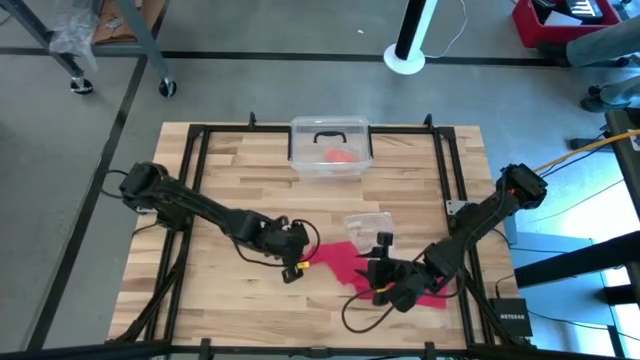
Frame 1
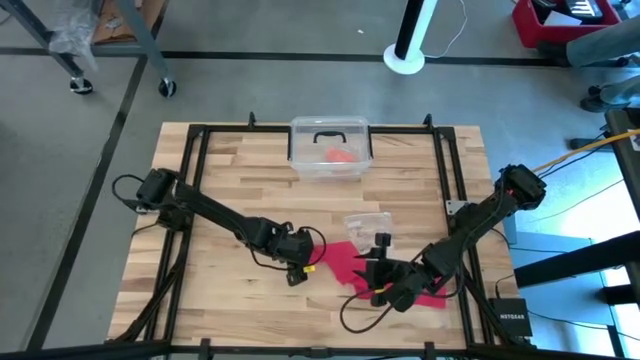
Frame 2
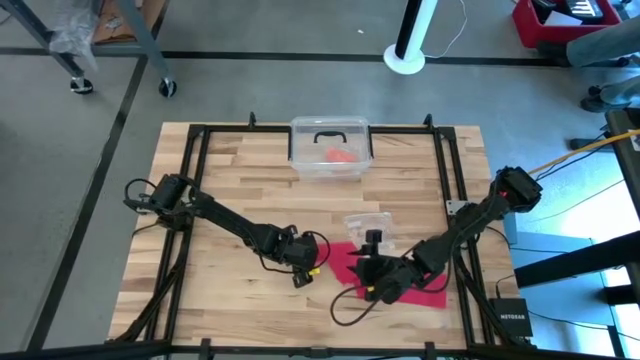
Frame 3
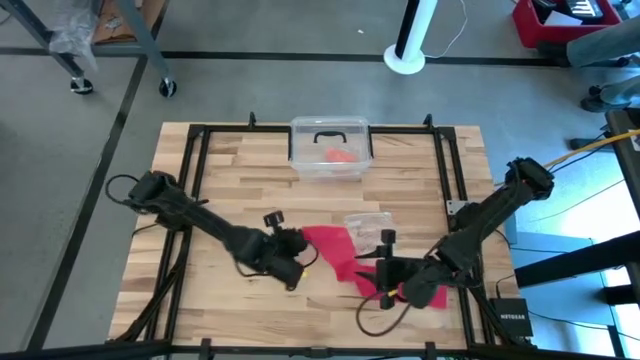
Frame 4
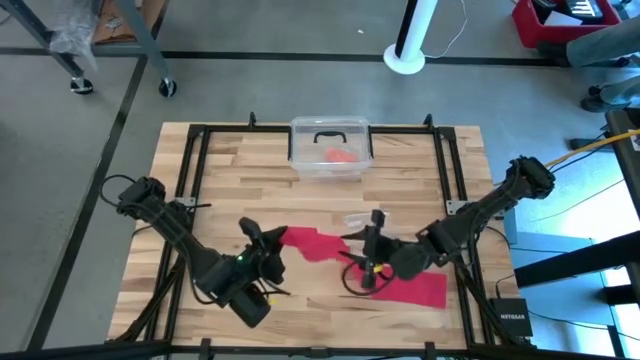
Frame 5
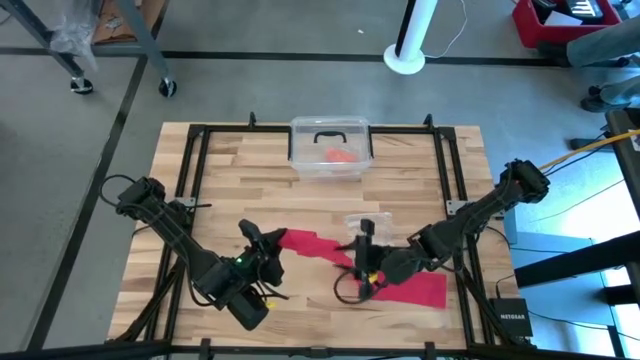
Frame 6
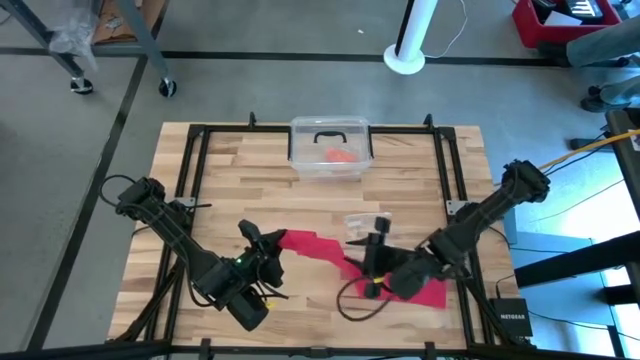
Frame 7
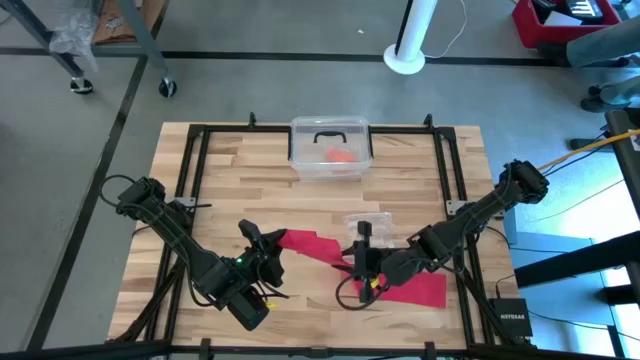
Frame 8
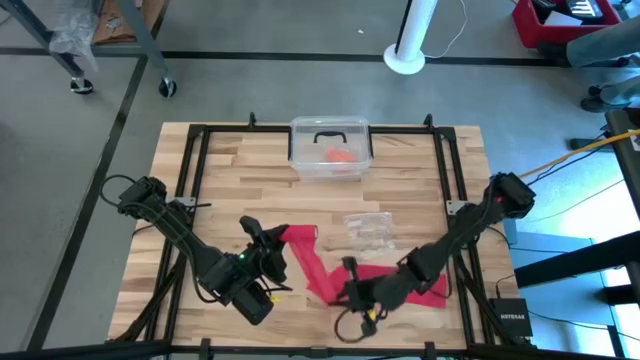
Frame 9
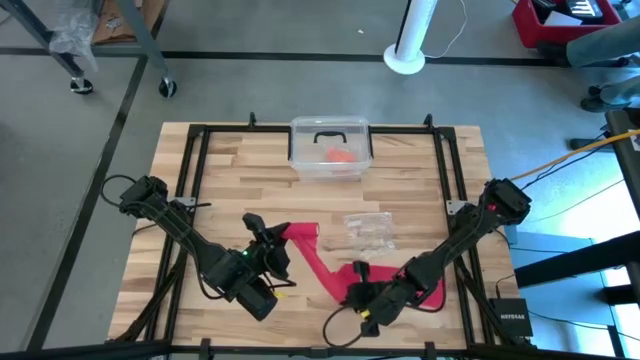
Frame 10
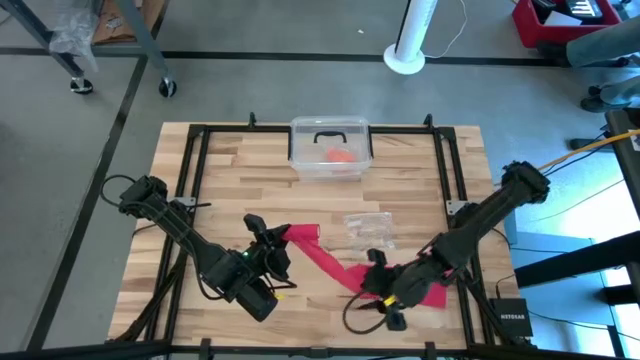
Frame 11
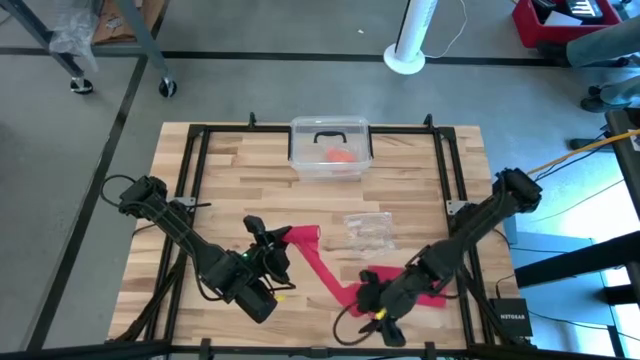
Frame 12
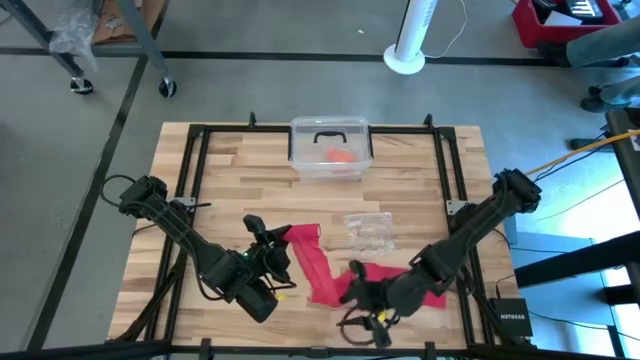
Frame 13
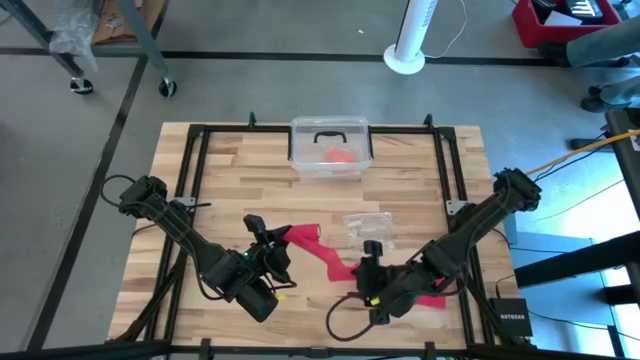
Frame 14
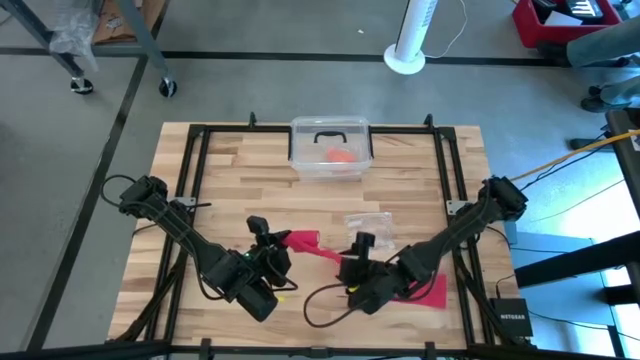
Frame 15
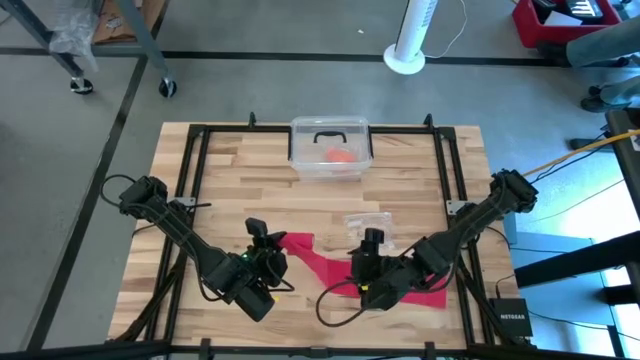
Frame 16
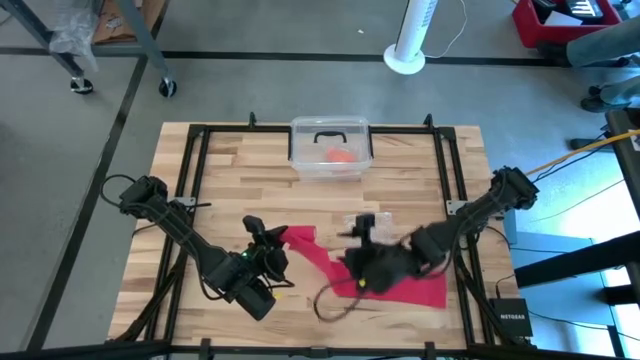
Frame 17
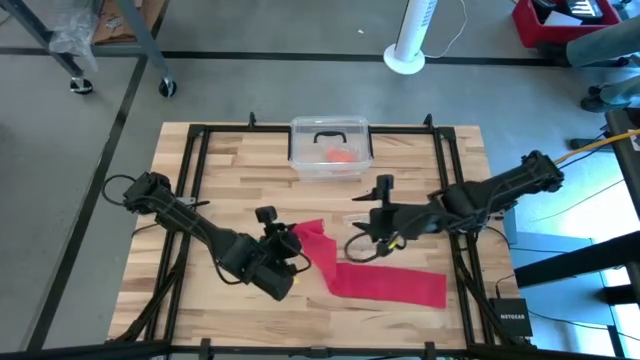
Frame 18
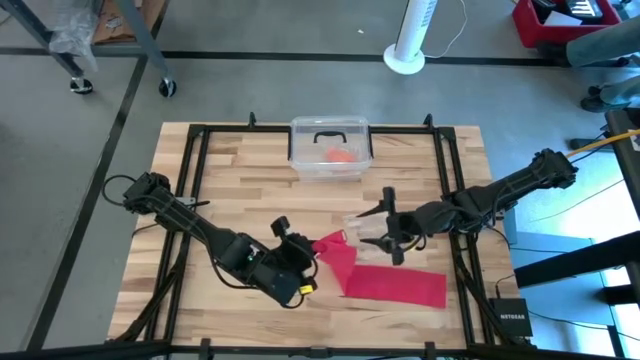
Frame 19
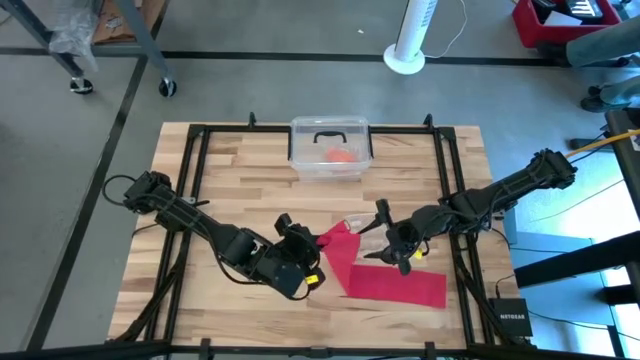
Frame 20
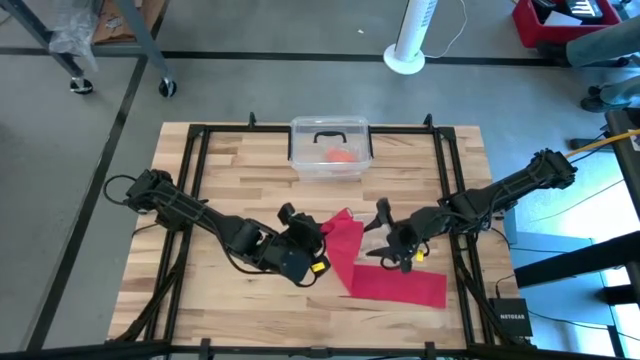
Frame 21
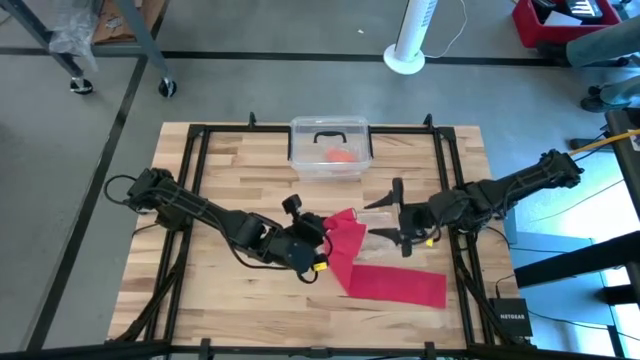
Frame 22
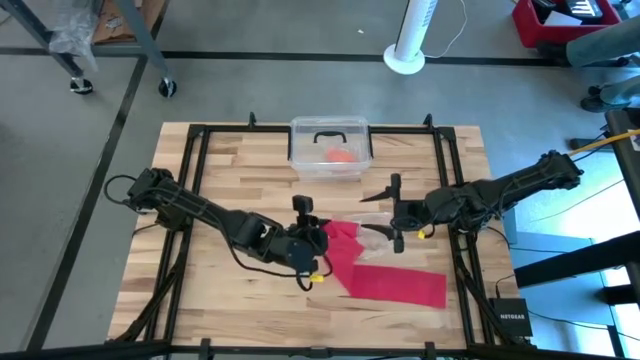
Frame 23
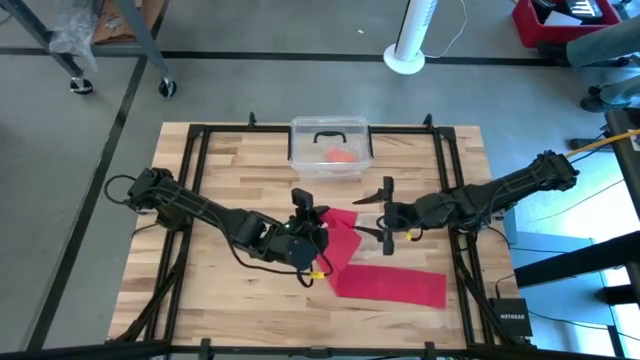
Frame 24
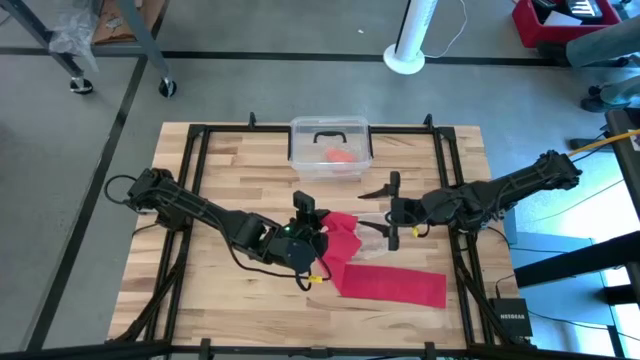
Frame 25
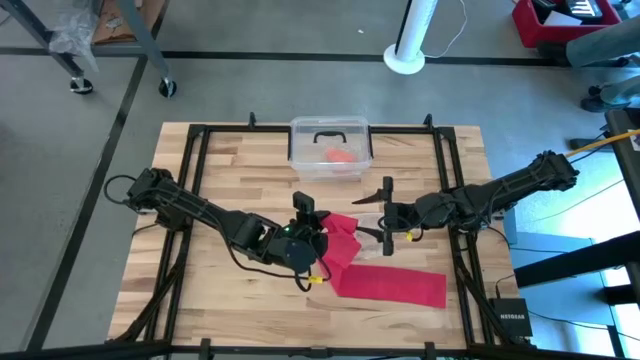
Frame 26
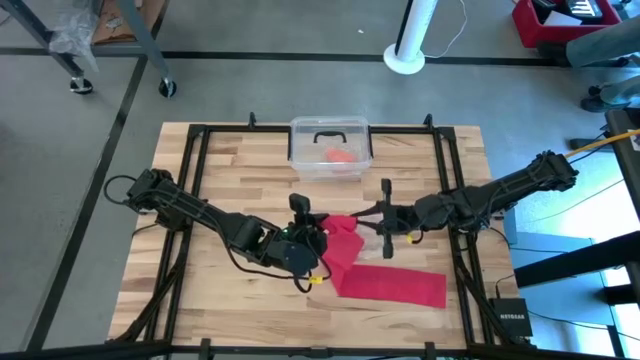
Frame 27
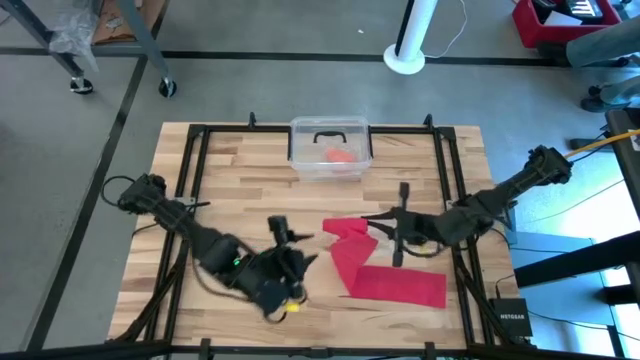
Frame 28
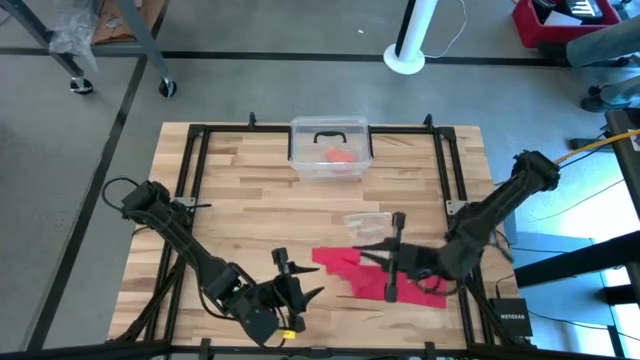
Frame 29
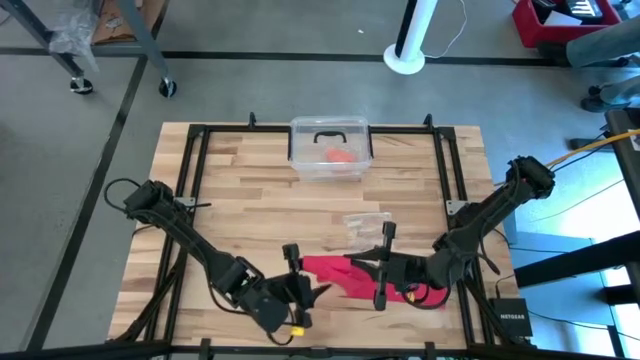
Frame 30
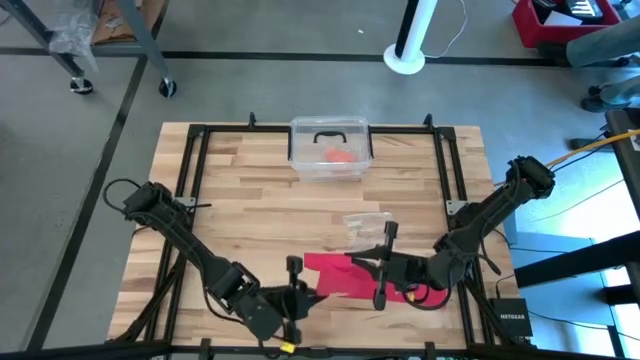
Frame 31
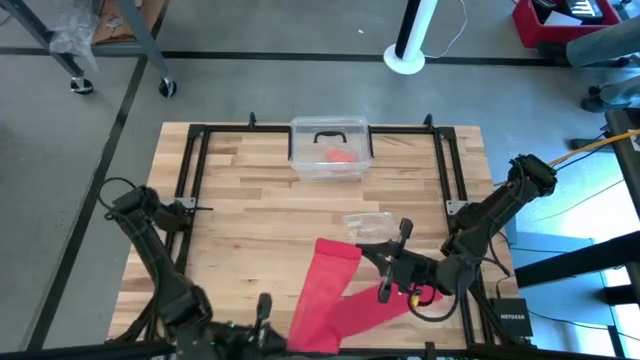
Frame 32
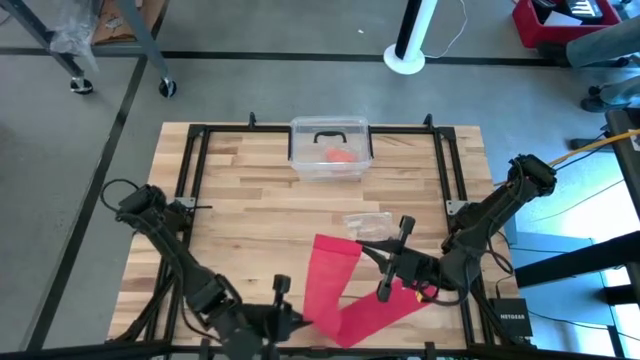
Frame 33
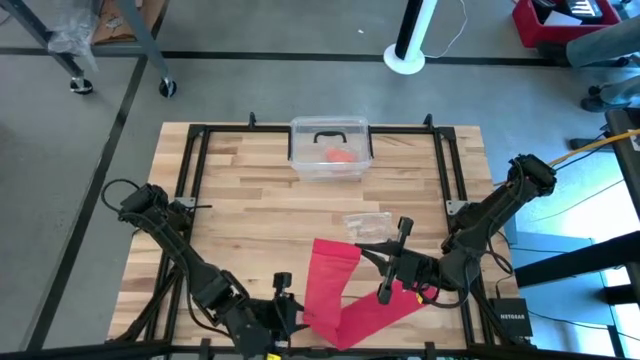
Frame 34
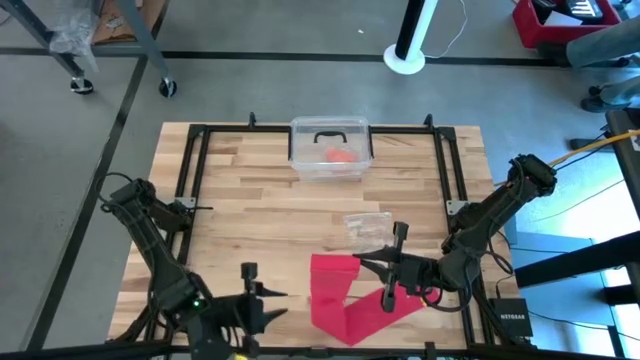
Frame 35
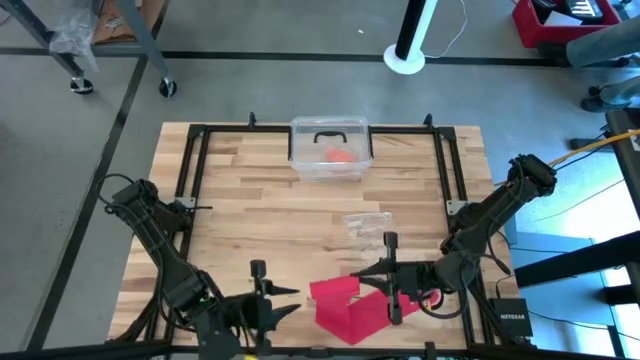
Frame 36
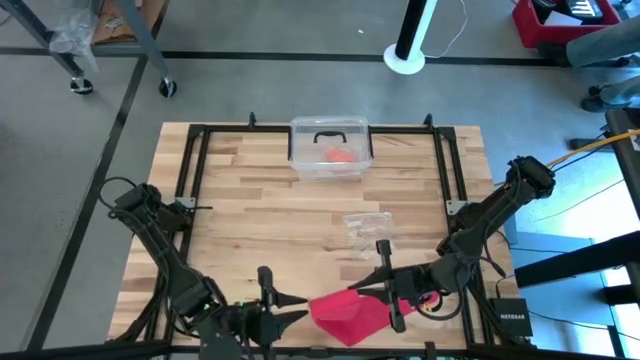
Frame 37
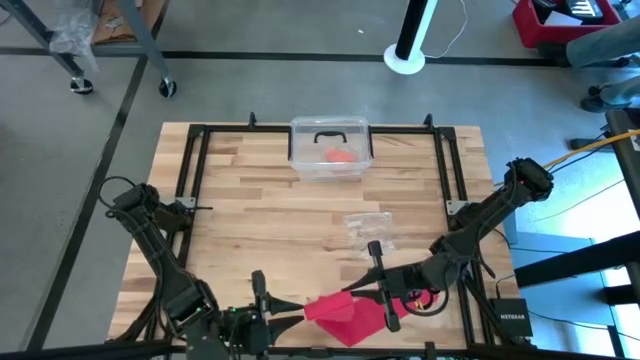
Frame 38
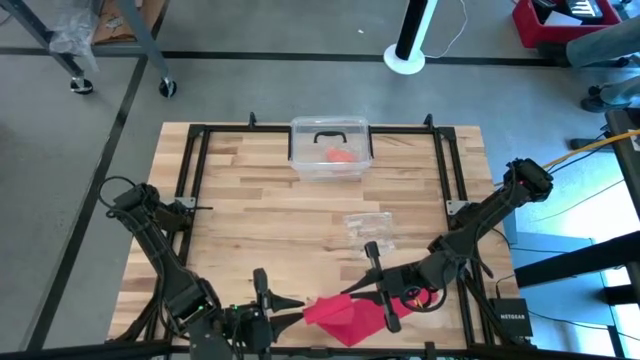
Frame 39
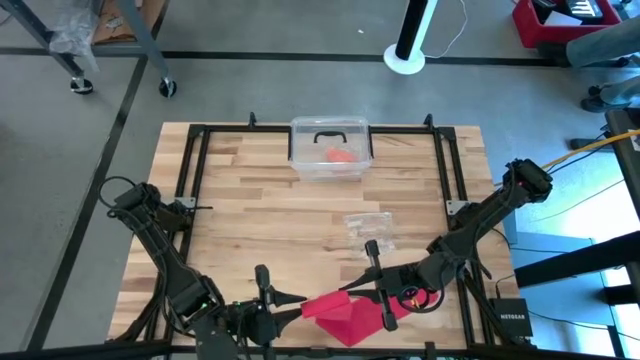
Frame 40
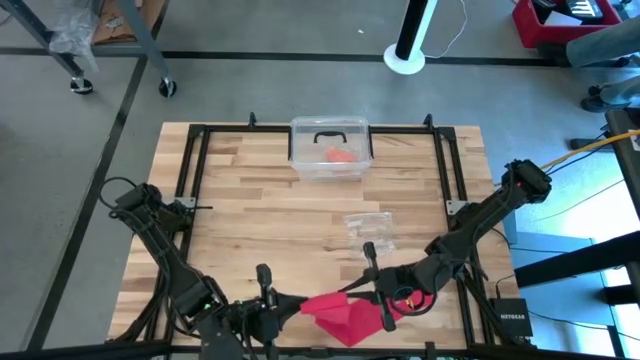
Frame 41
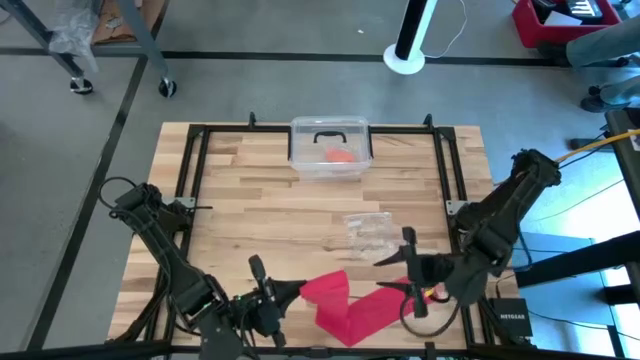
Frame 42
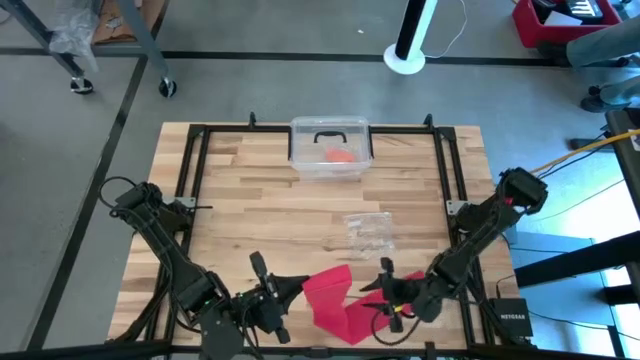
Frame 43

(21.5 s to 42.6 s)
Task: Roll bandage
Roll the red bandage
